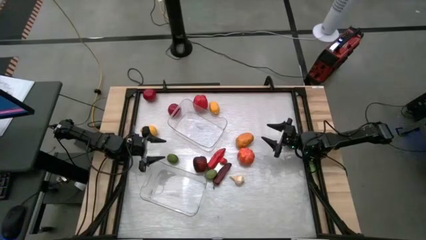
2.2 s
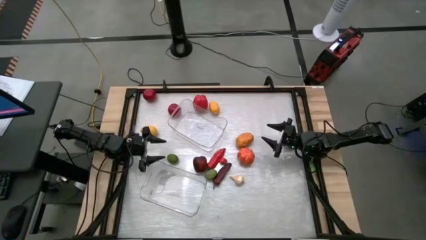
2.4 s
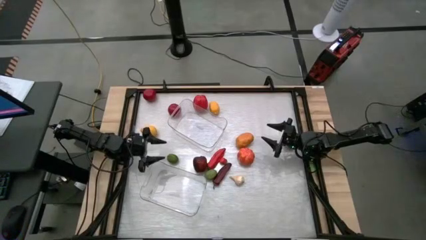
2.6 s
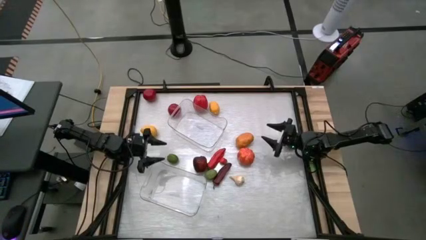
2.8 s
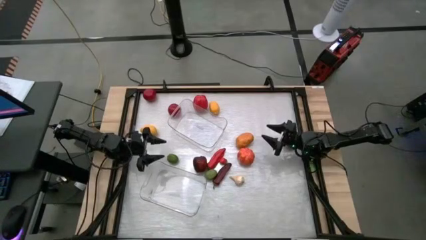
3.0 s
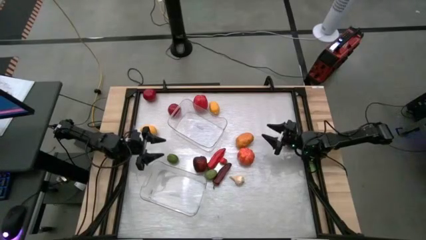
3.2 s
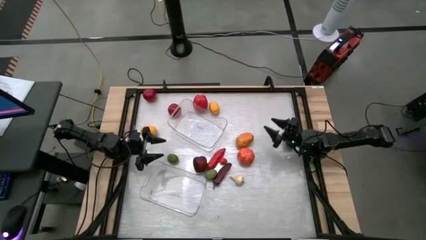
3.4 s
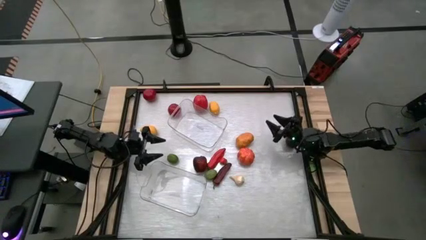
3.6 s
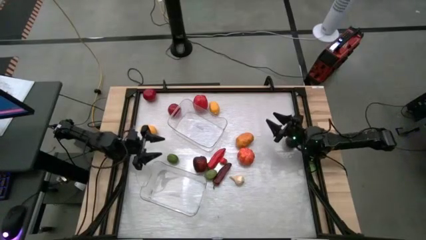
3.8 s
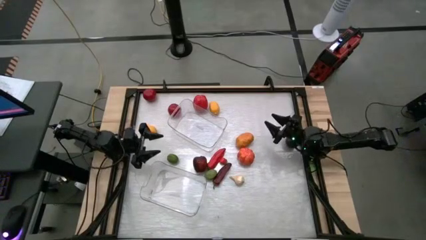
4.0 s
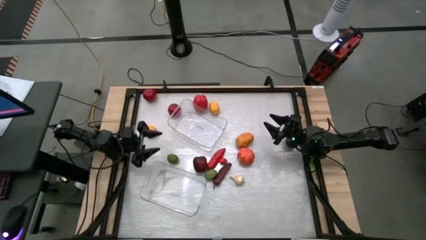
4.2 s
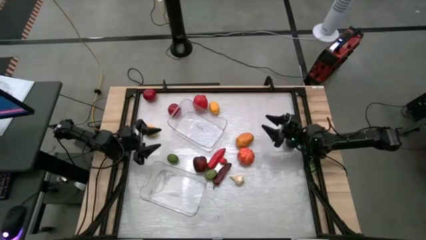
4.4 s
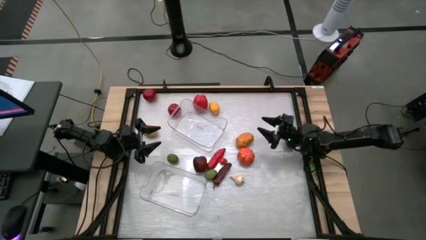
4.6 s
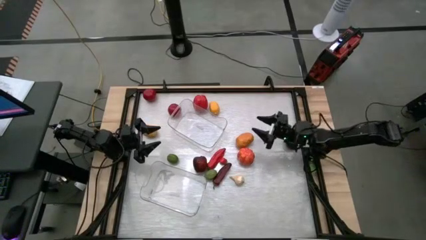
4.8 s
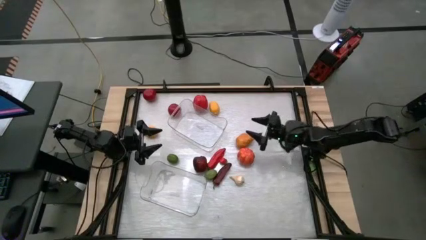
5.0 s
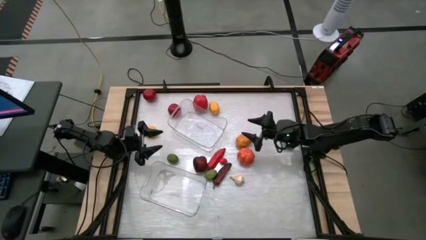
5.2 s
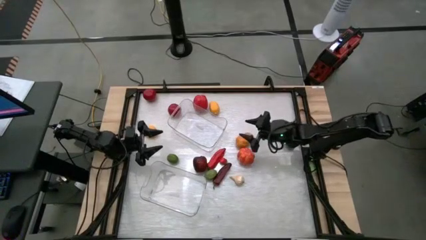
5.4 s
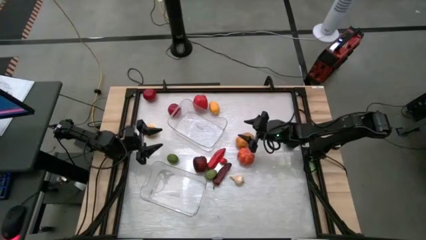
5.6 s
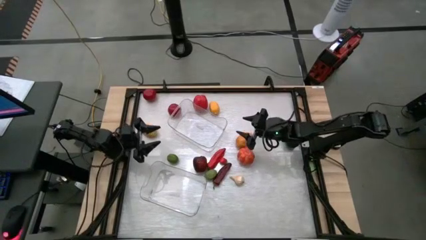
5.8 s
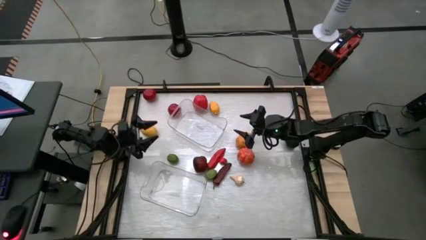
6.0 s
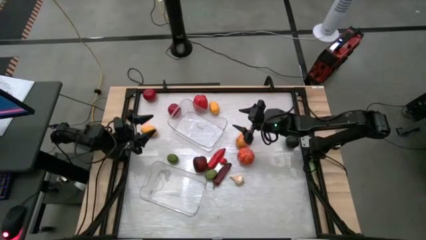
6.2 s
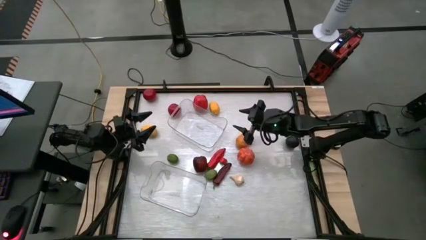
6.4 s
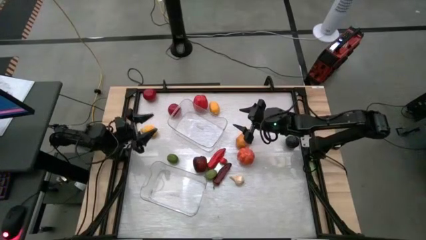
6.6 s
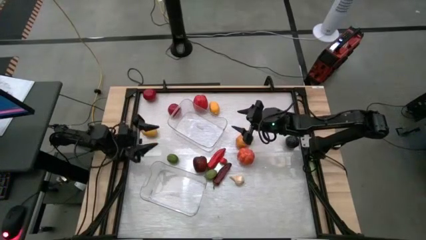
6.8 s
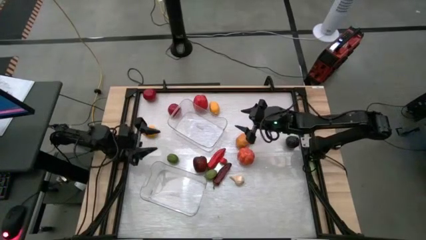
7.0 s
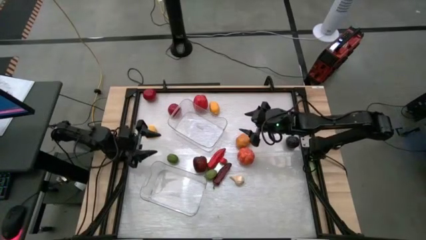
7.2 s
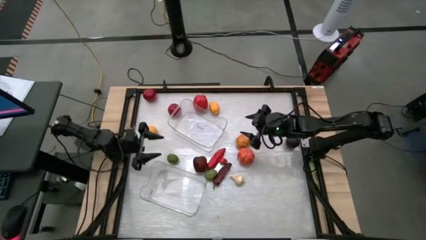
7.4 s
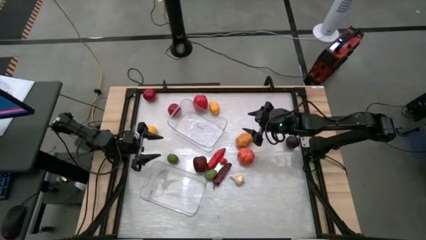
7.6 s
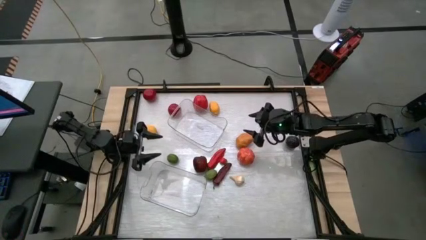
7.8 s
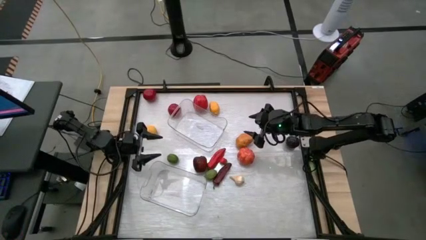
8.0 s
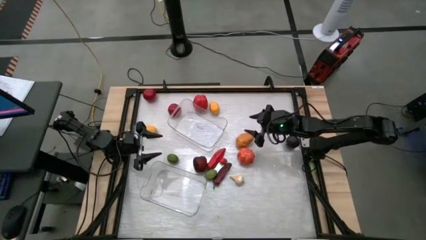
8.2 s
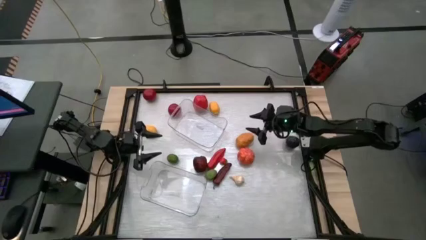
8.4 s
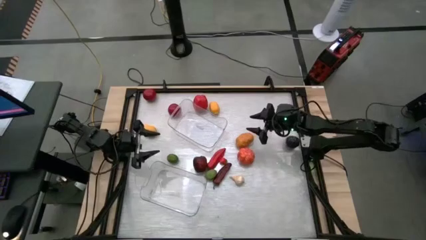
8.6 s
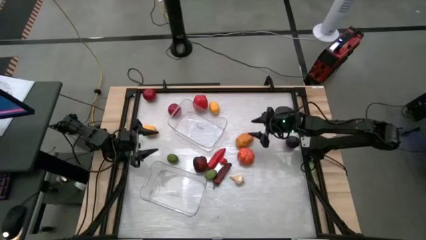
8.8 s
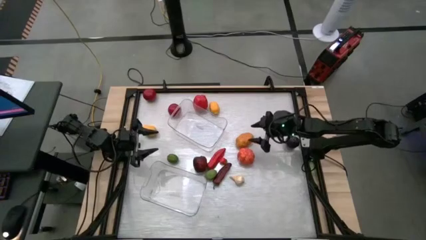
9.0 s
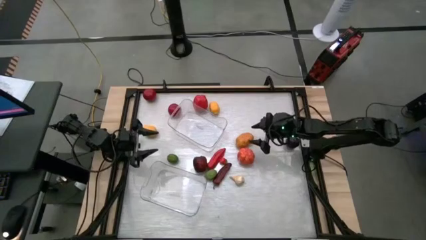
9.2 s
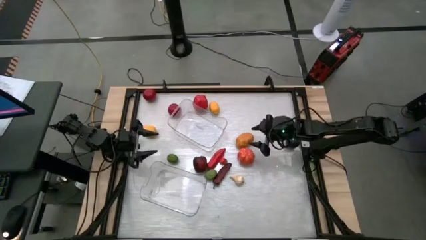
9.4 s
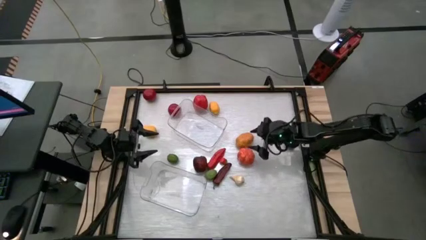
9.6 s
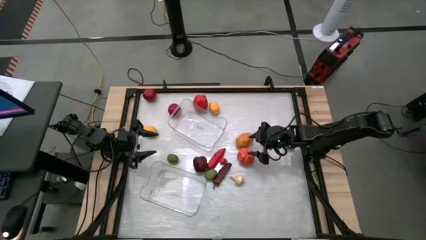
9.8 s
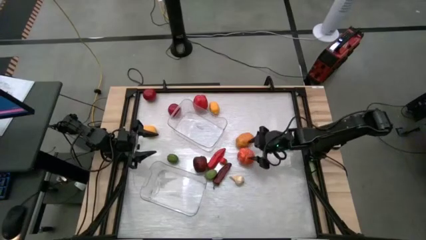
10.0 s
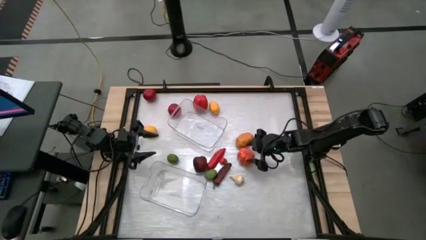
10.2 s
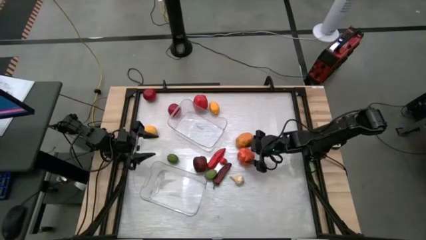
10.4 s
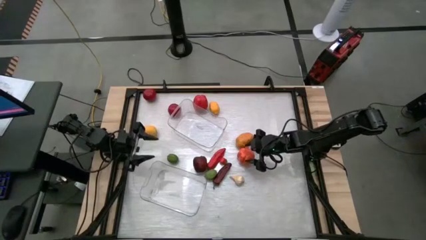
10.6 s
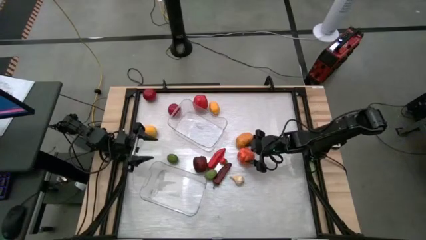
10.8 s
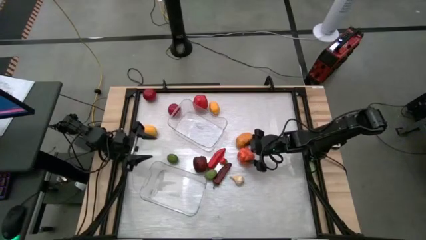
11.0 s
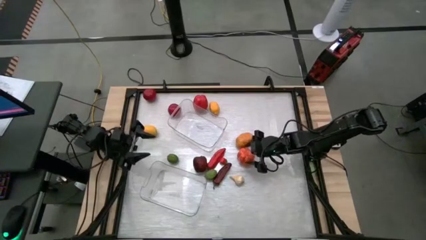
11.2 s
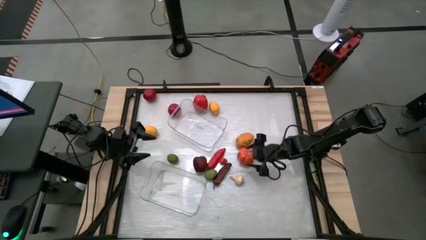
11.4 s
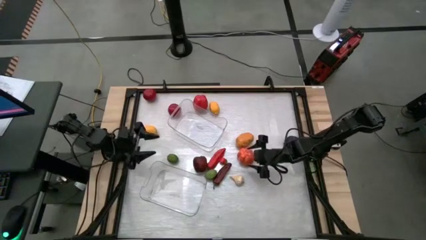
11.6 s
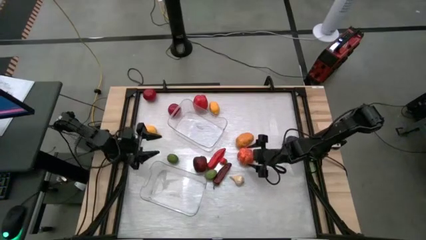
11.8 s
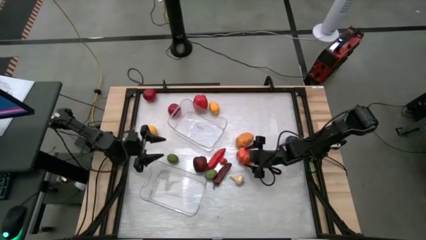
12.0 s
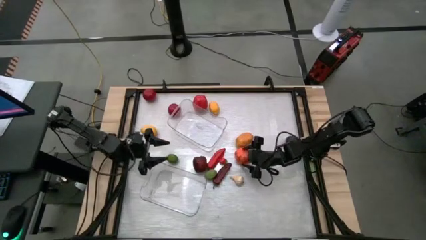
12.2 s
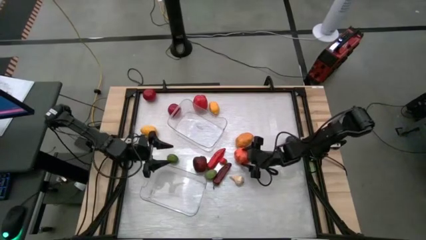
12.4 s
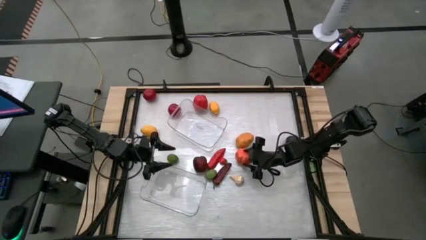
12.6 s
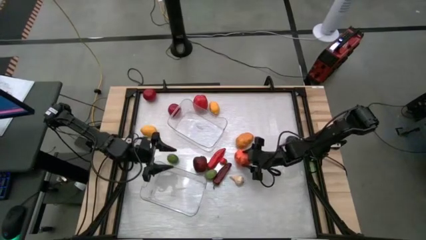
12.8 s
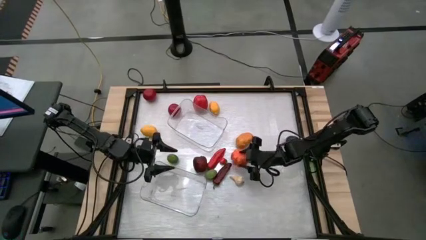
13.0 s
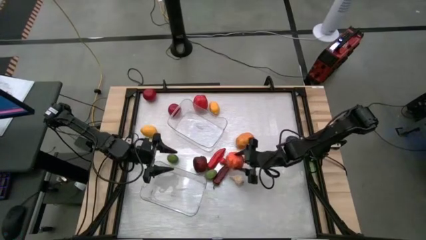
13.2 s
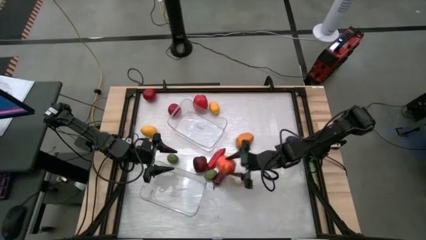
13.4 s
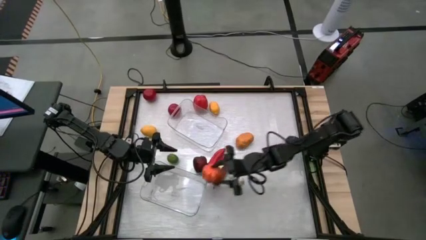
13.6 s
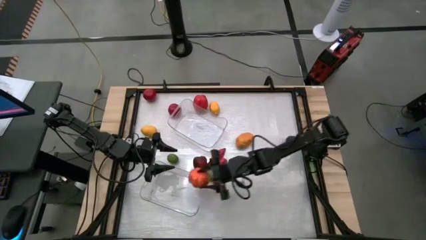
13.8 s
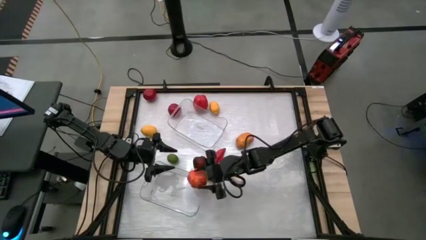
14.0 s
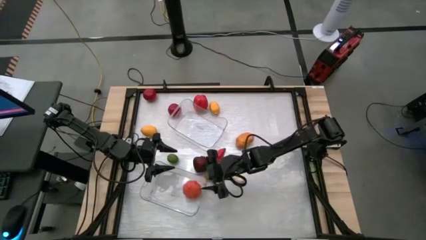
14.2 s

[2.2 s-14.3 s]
Task: Sort produce into baskets
Put the orange pumpkin into the bottom transparent bin

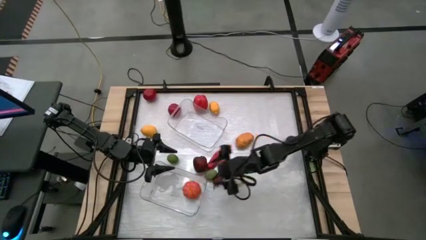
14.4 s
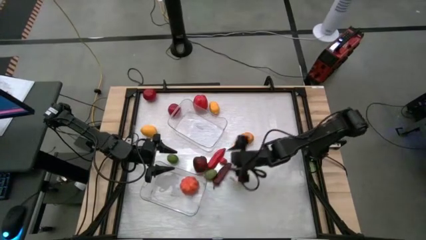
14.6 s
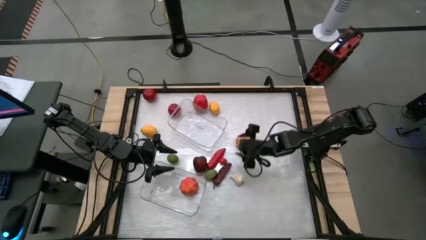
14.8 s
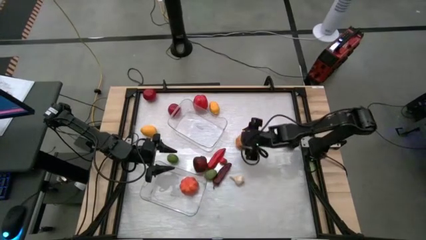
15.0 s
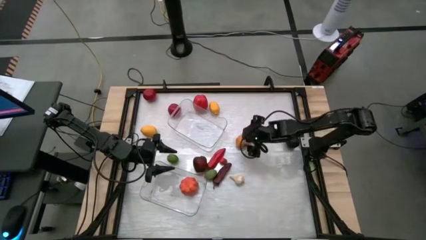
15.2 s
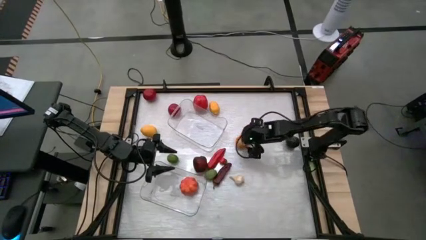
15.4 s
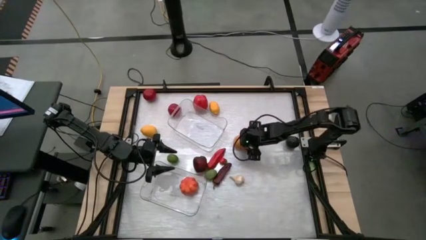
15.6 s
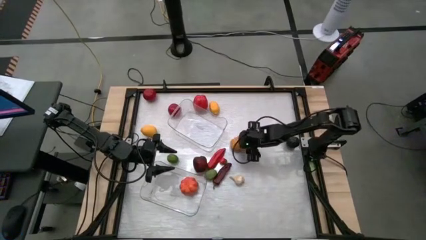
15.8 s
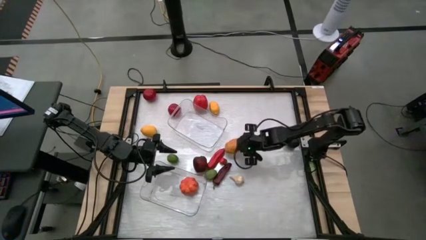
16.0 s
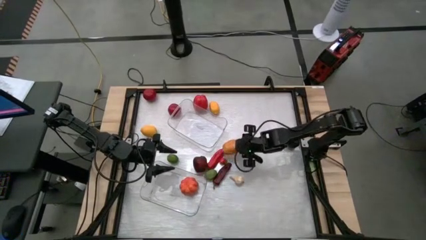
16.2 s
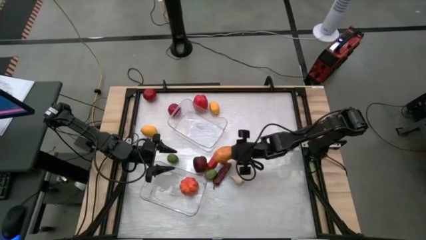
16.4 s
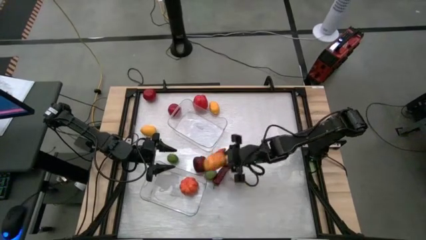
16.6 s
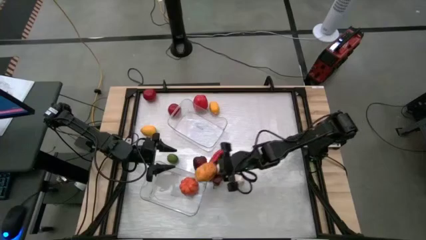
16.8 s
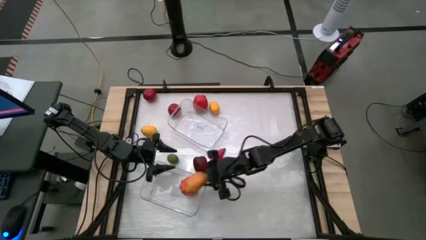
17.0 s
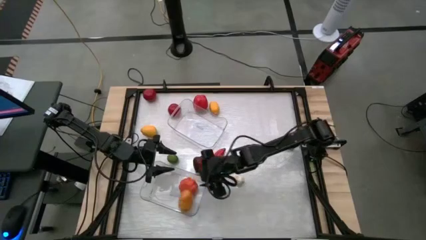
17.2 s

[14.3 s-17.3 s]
Put the brown potato into the bottom transparent bin

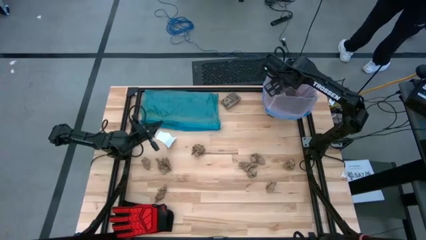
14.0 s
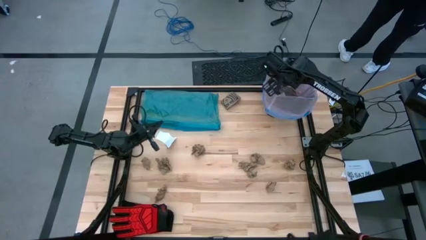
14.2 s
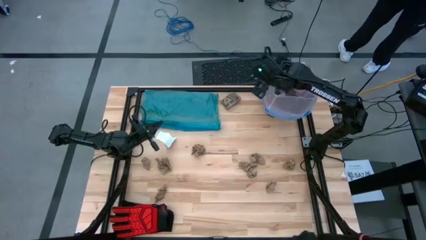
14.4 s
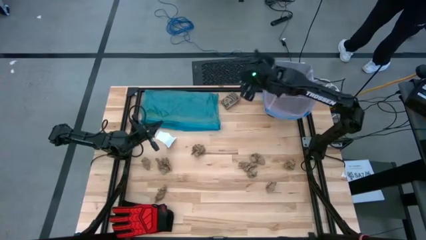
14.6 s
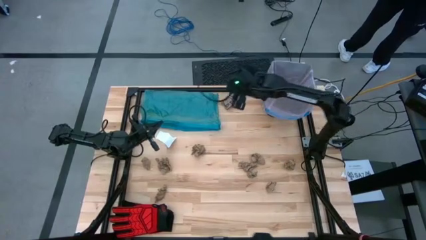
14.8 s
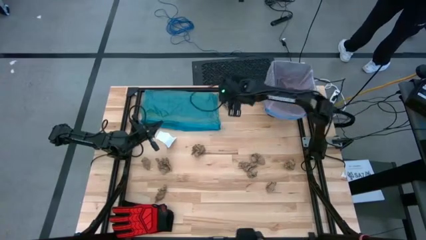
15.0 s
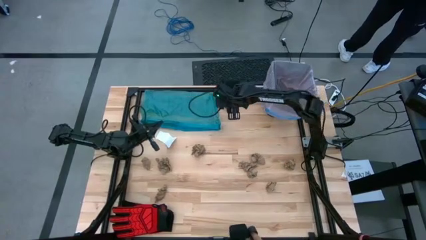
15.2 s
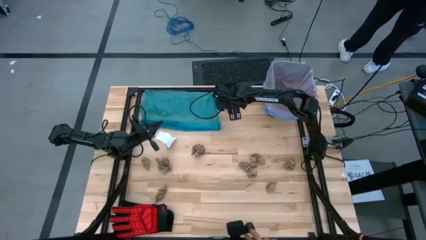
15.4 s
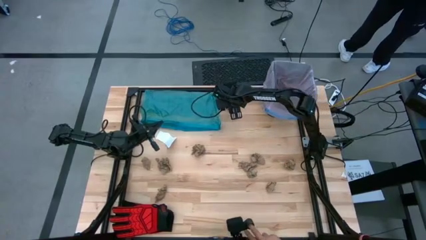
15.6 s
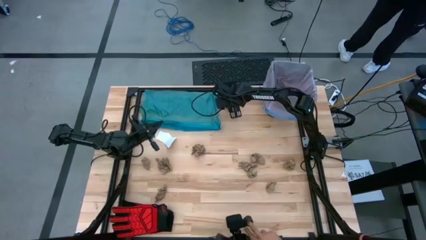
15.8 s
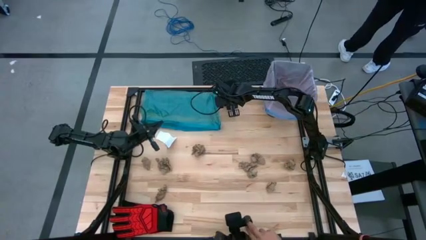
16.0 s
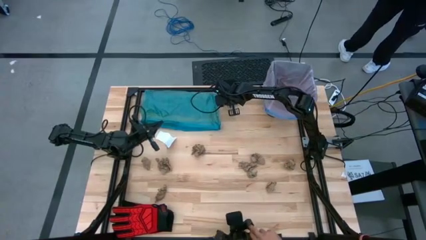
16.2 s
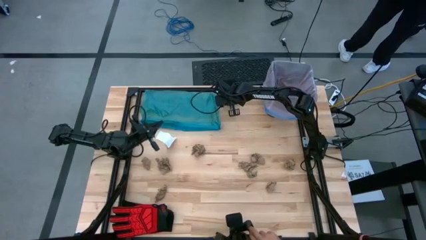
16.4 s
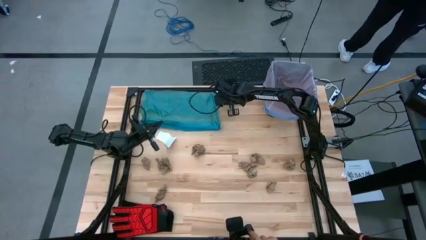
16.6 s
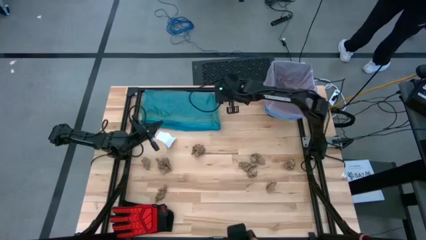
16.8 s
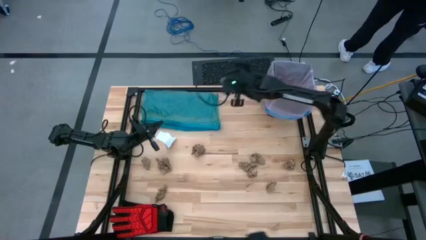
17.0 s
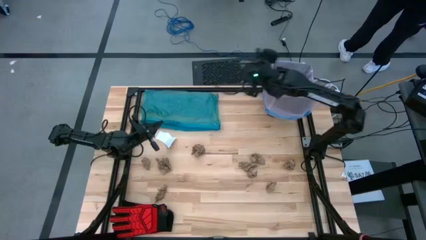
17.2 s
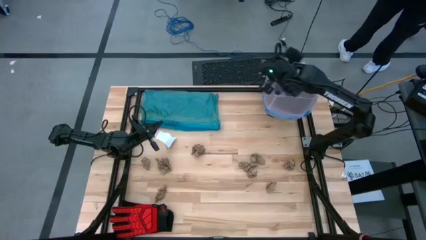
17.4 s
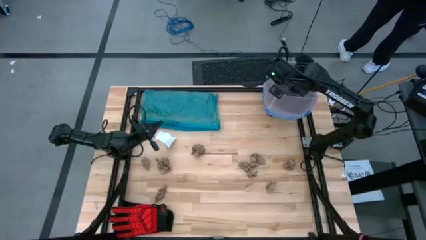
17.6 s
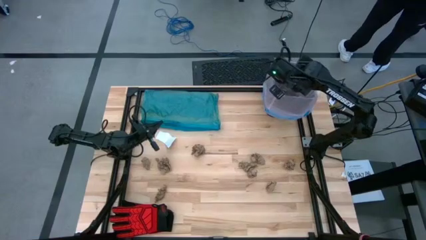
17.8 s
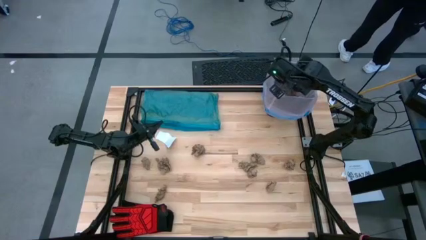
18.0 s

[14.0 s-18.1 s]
Task: place trash/remove bag and relplace
Put the brown paper into the trash bin
